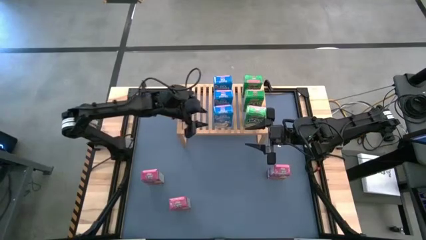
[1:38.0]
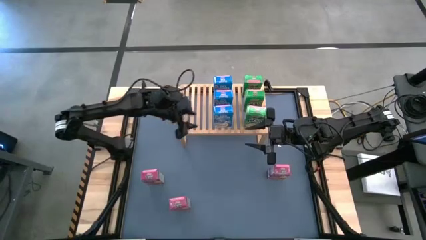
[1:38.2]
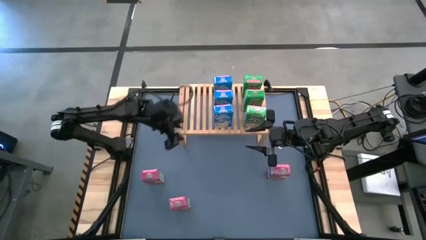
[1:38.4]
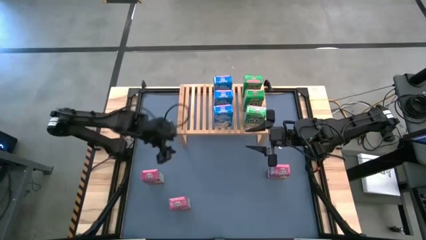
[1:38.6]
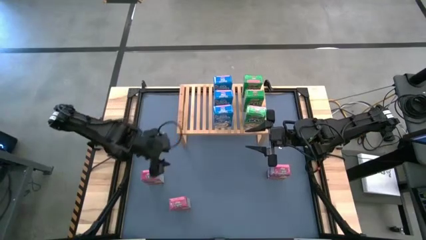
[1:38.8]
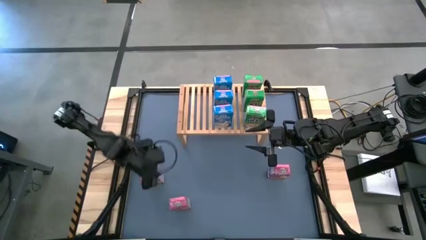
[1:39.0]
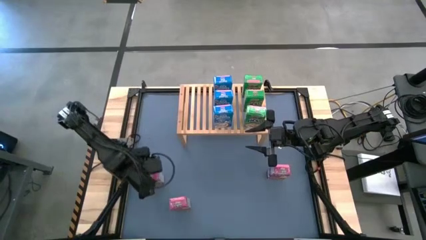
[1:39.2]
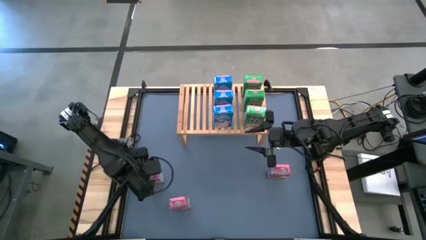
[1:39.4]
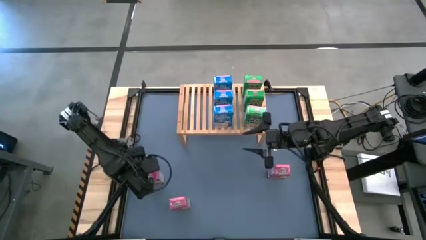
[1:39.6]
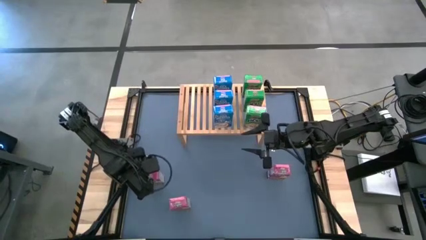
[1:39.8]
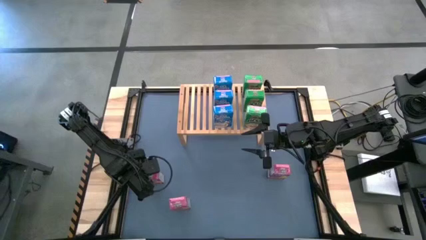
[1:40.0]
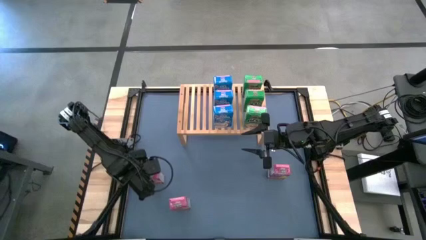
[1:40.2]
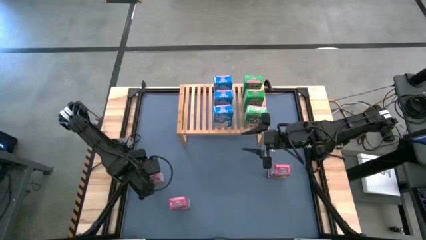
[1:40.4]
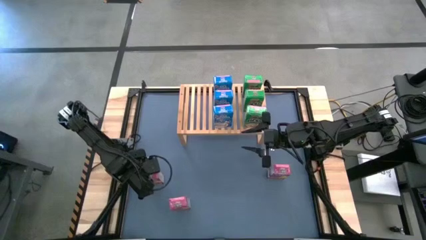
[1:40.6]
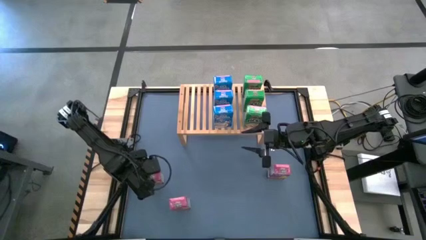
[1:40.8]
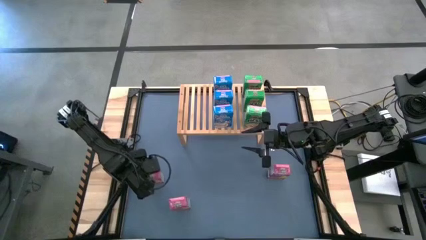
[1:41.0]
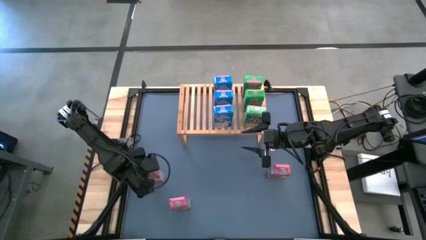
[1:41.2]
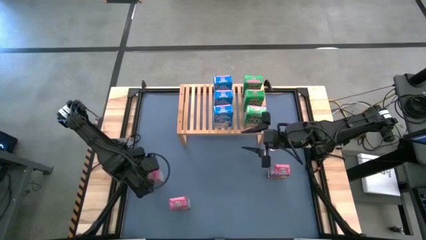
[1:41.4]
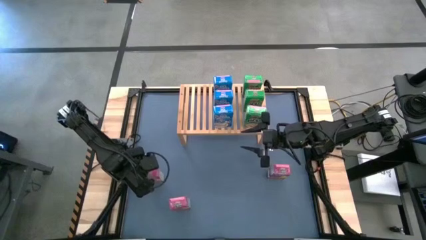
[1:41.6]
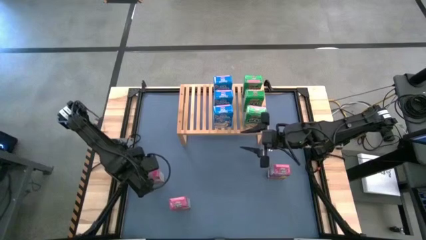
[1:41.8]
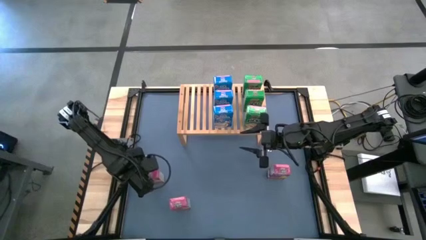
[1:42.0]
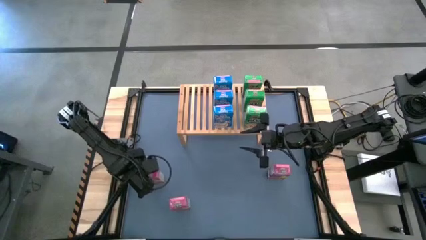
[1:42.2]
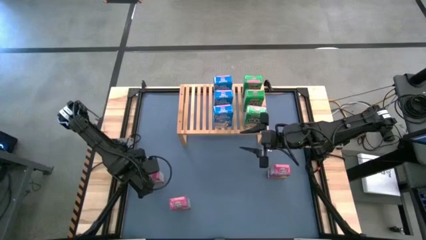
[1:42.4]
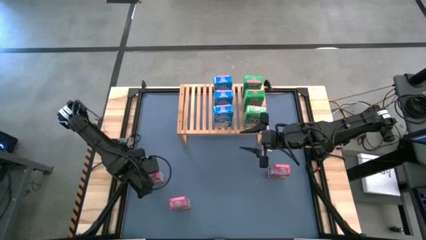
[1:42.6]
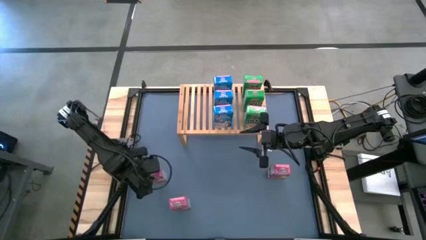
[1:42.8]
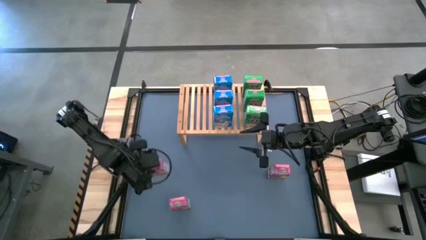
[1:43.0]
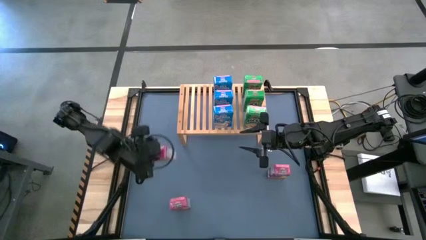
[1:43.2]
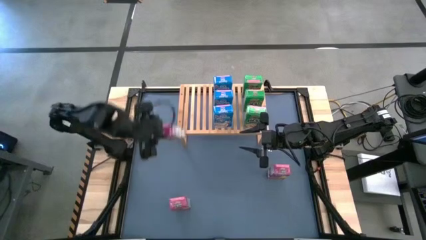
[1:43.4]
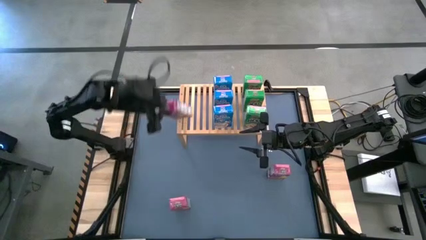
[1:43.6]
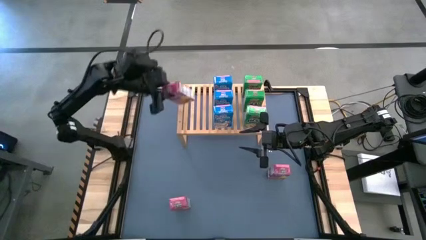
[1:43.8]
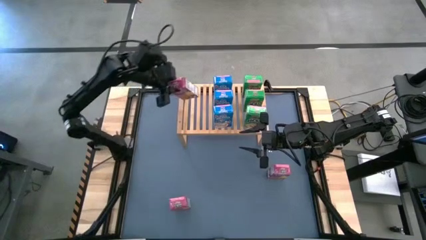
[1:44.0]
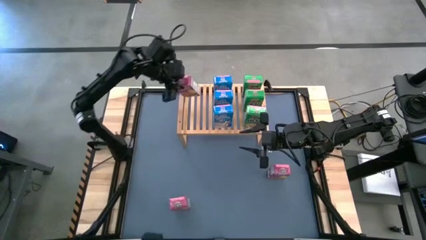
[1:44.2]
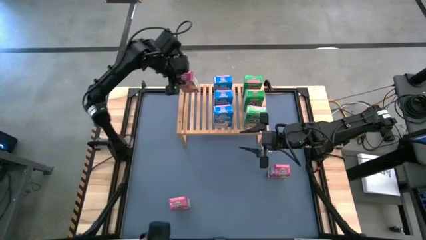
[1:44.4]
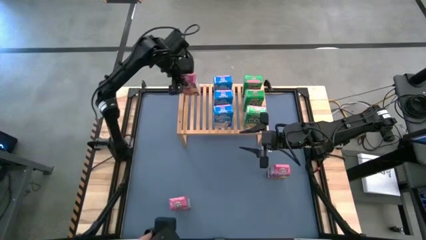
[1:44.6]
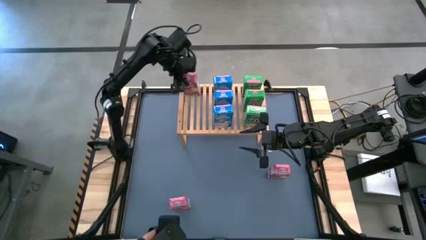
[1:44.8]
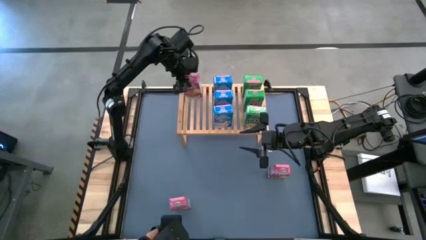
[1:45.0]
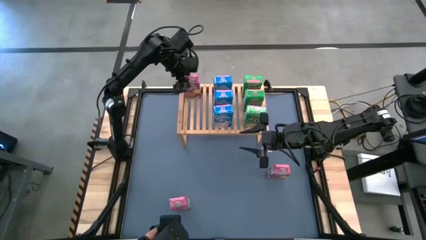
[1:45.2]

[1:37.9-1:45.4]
Task: Stack cereal on shelf
Put the top left pink cereal box on the shelf

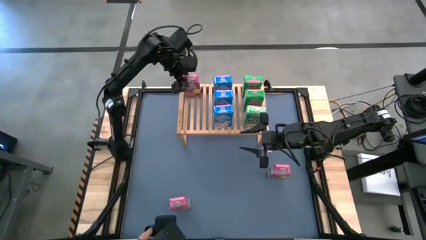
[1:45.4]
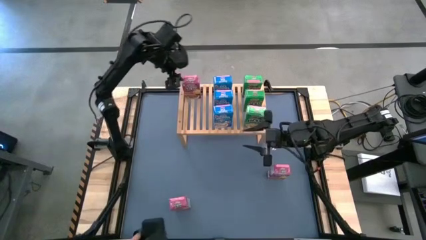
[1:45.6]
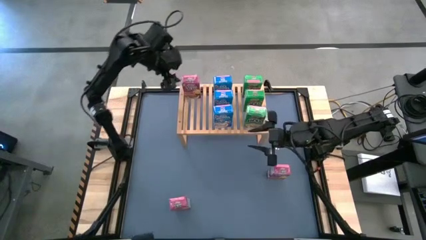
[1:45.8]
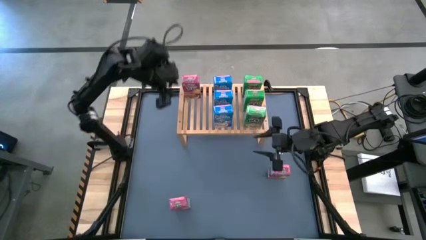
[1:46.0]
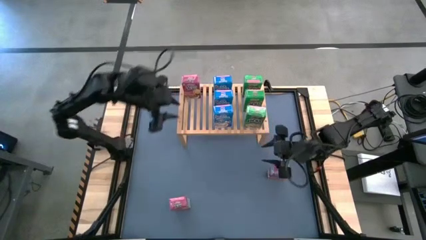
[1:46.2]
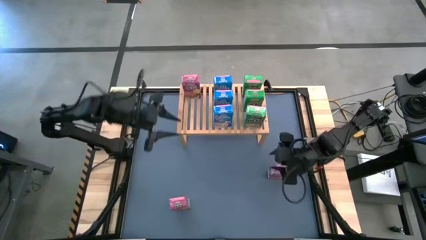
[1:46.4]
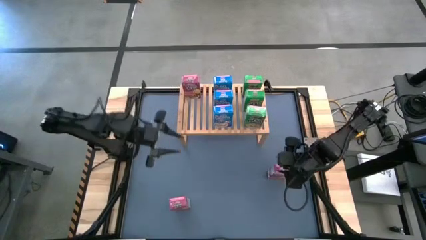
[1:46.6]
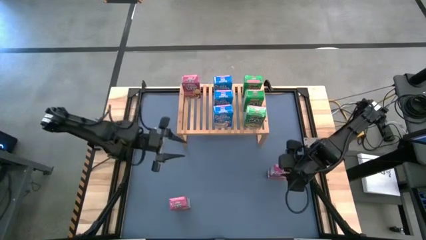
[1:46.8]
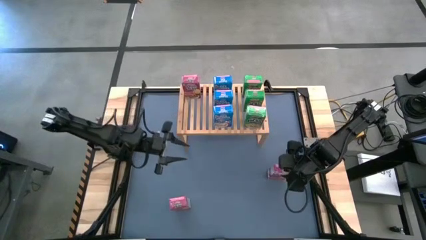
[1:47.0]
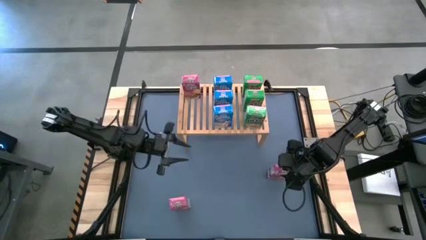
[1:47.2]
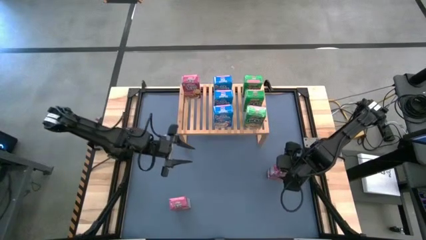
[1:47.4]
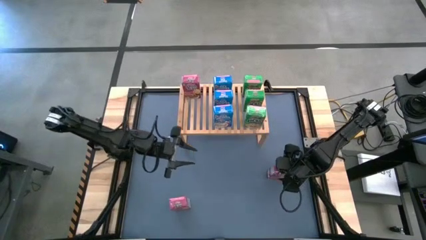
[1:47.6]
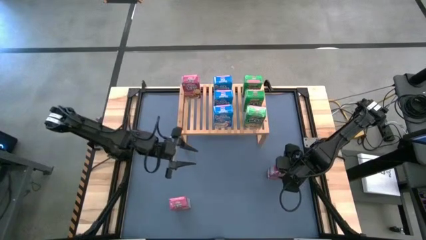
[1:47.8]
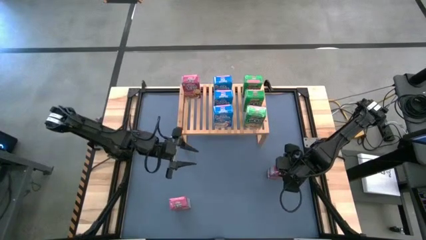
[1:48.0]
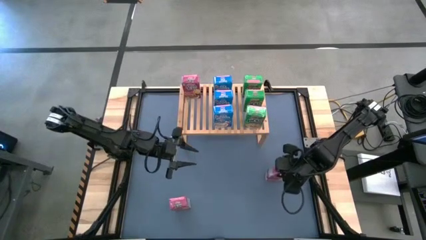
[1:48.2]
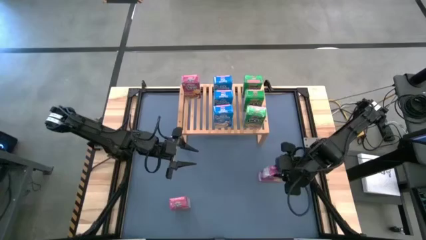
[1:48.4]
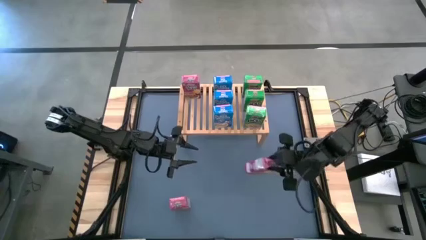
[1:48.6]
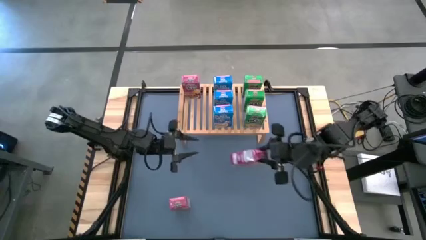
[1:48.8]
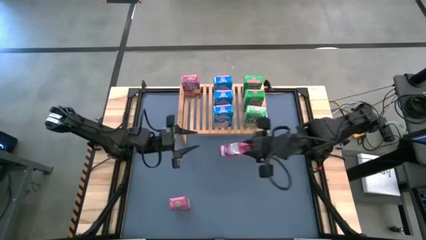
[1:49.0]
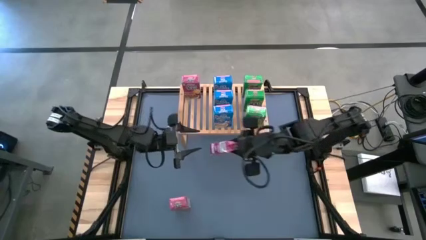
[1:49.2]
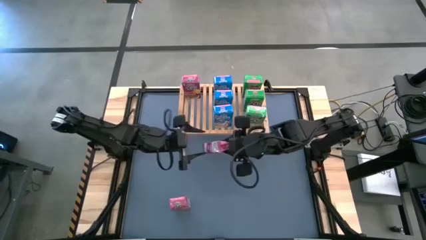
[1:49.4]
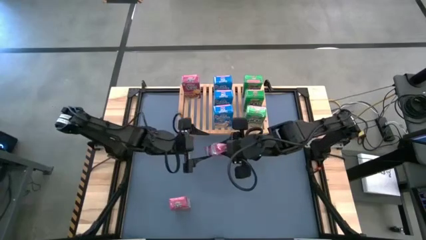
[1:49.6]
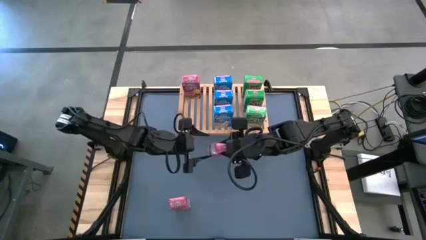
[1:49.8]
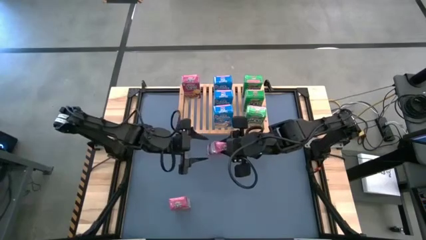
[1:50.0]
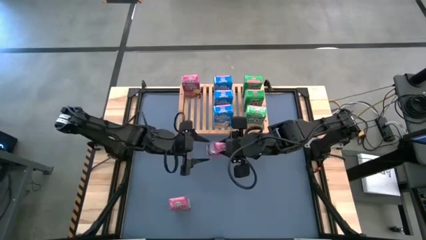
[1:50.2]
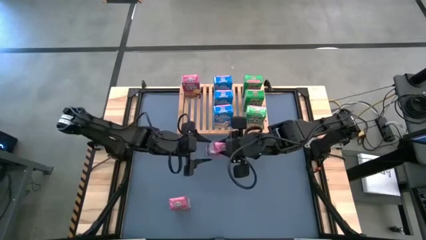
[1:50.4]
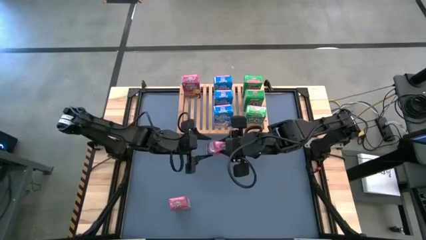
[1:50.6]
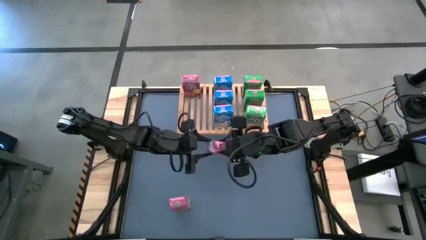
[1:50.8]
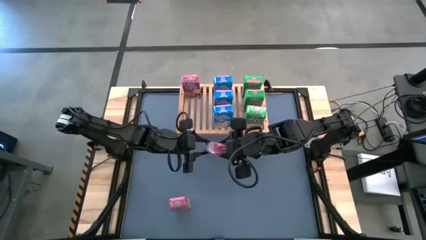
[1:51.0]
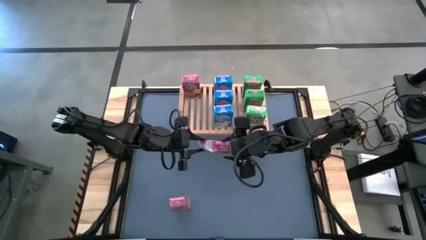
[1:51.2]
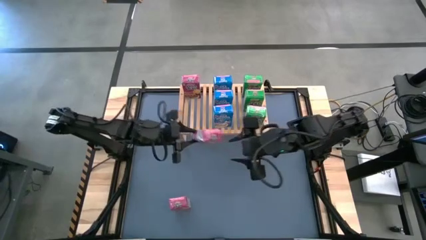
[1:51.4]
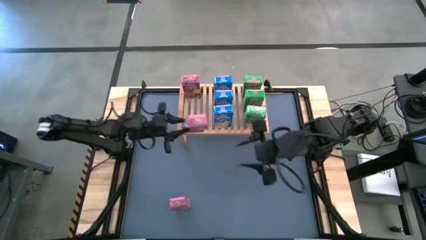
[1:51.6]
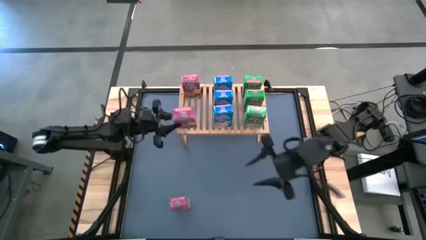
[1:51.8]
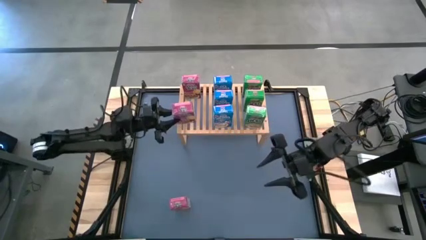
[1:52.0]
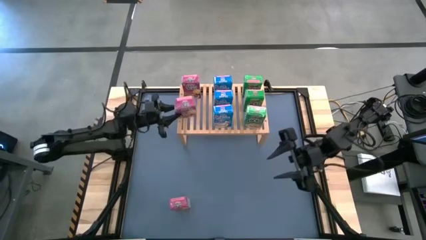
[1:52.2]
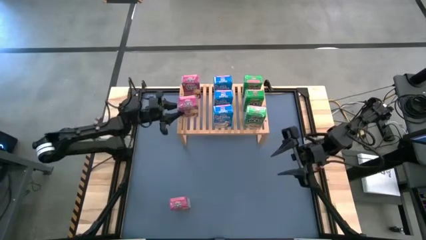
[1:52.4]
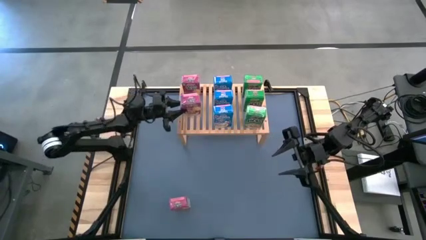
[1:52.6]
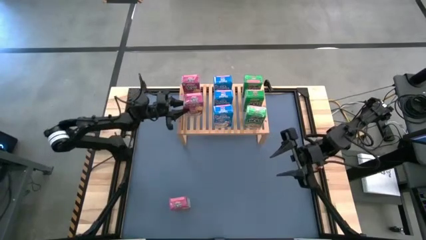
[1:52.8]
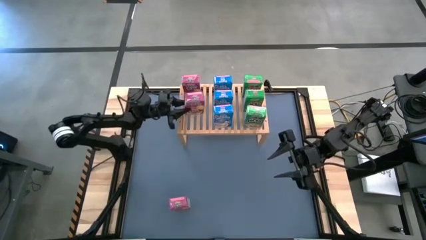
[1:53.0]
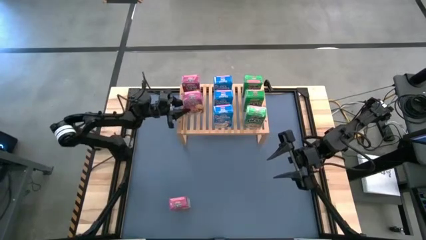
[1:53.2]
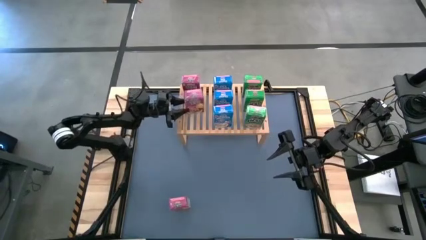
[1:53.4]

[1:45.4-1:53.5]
Put the top pink cereal box on the shelf aligned with the other pink cereal box
